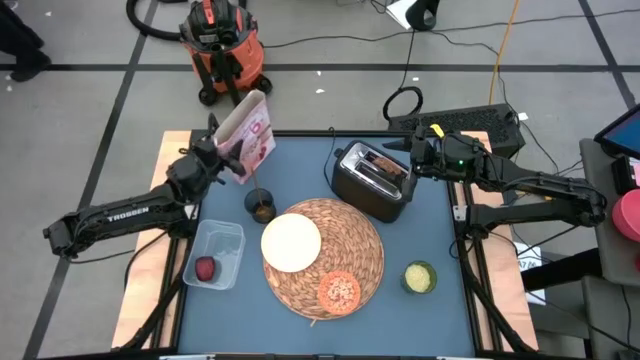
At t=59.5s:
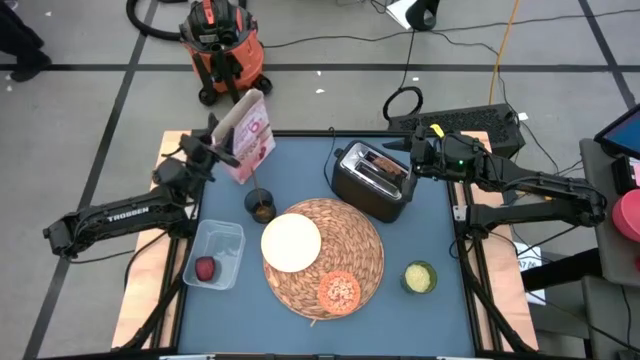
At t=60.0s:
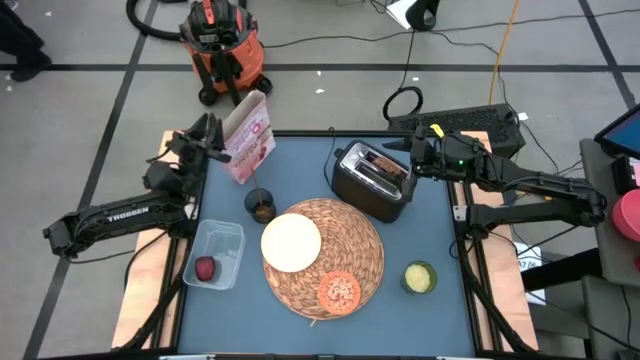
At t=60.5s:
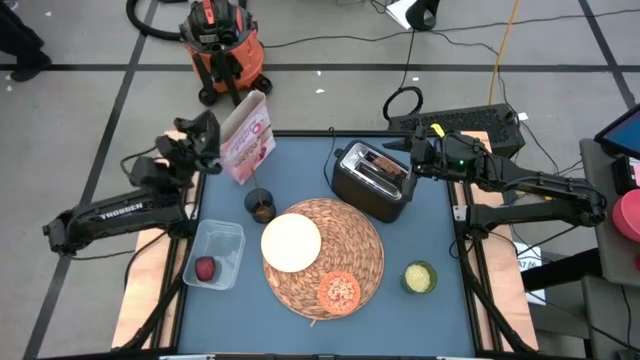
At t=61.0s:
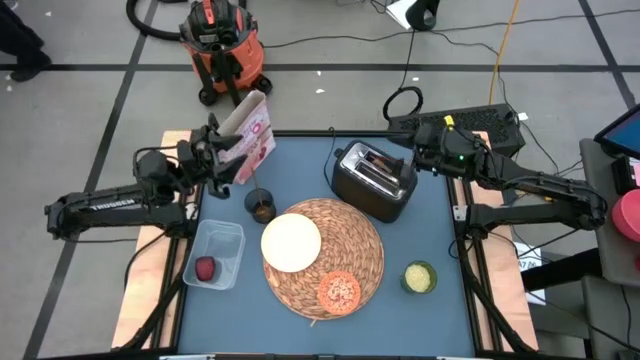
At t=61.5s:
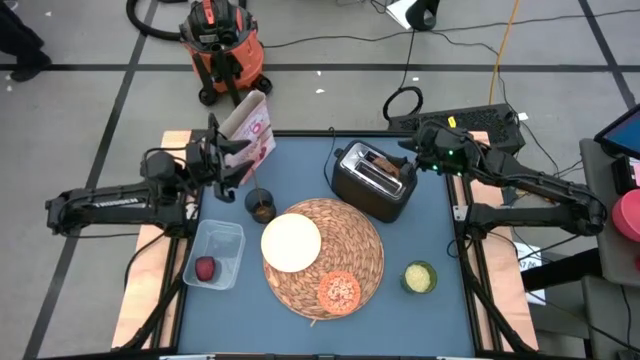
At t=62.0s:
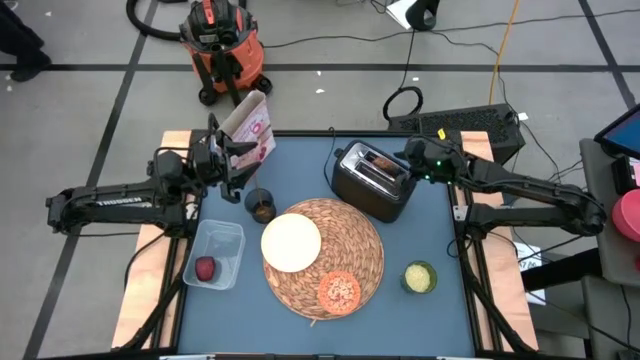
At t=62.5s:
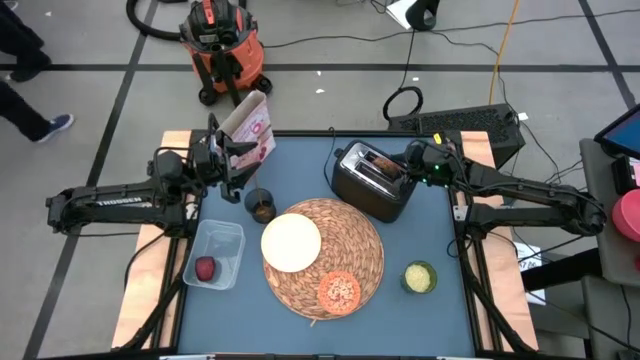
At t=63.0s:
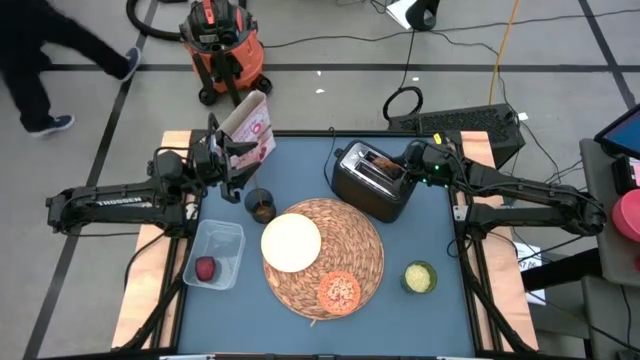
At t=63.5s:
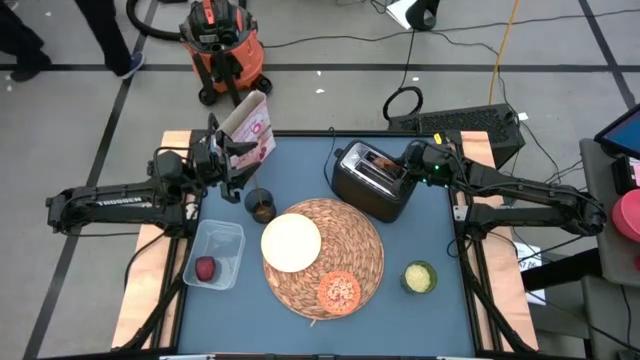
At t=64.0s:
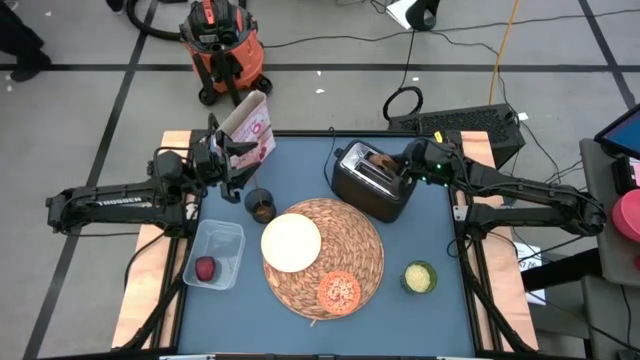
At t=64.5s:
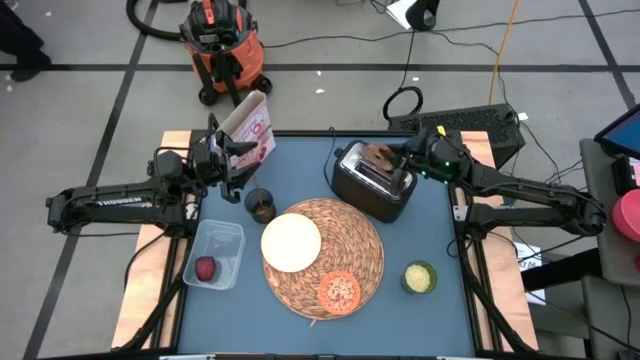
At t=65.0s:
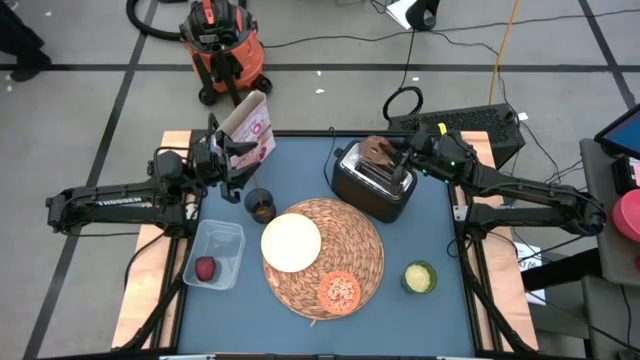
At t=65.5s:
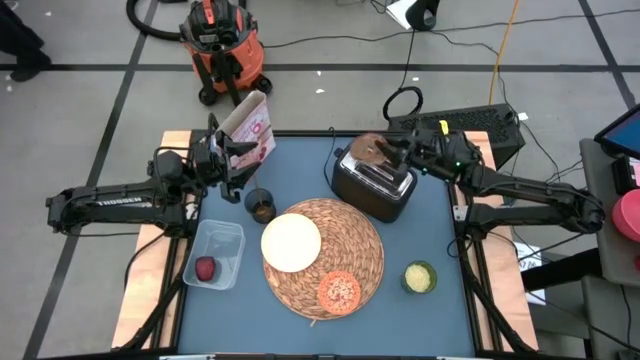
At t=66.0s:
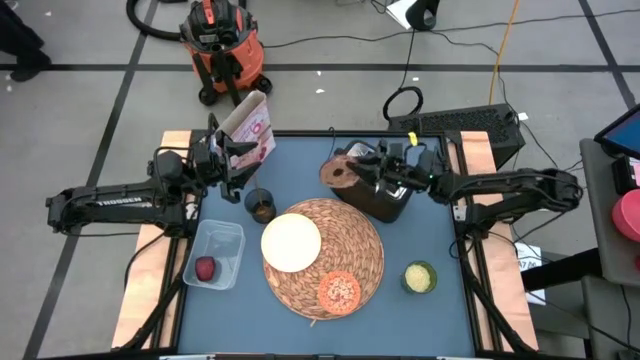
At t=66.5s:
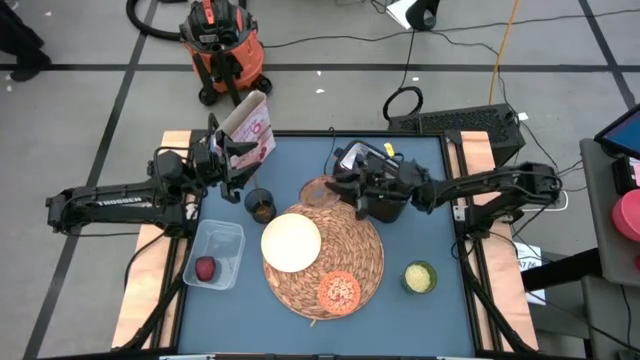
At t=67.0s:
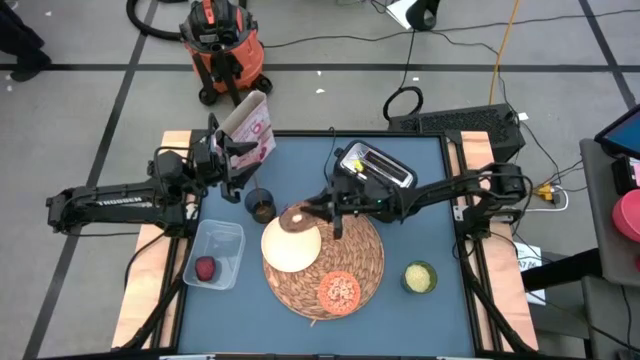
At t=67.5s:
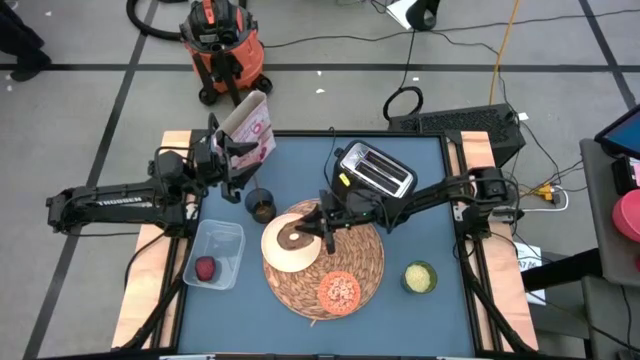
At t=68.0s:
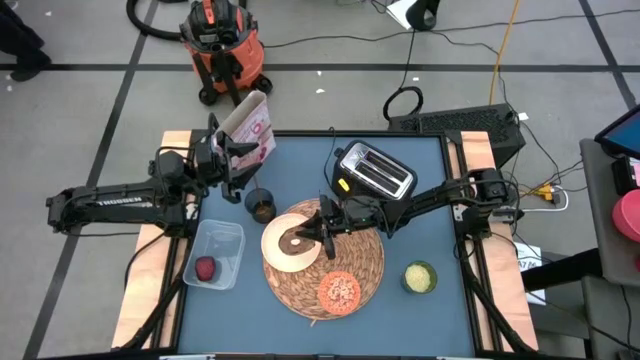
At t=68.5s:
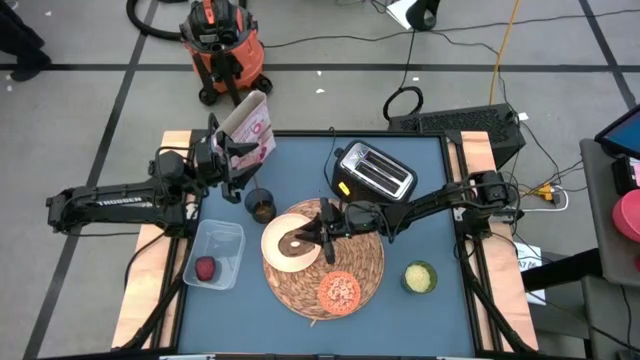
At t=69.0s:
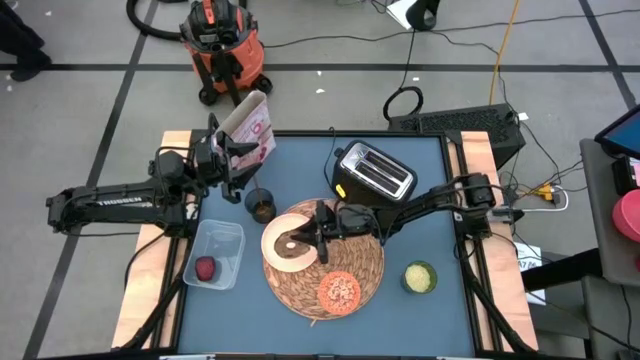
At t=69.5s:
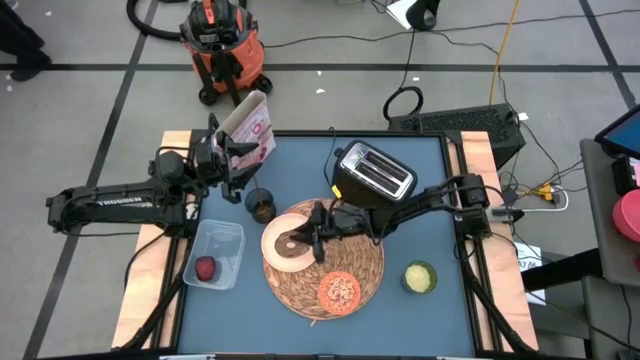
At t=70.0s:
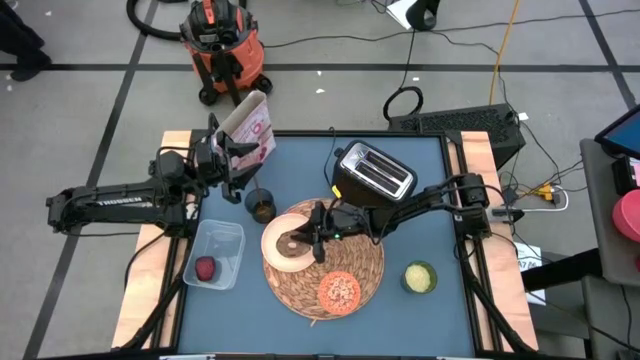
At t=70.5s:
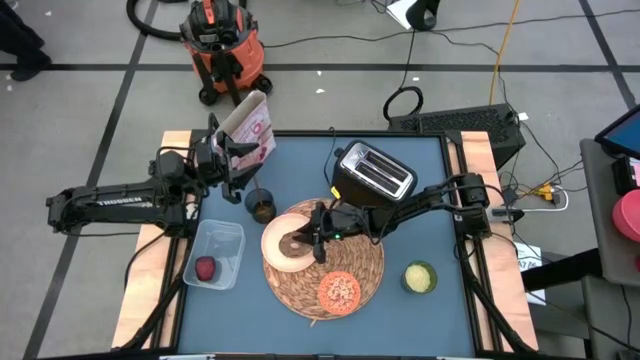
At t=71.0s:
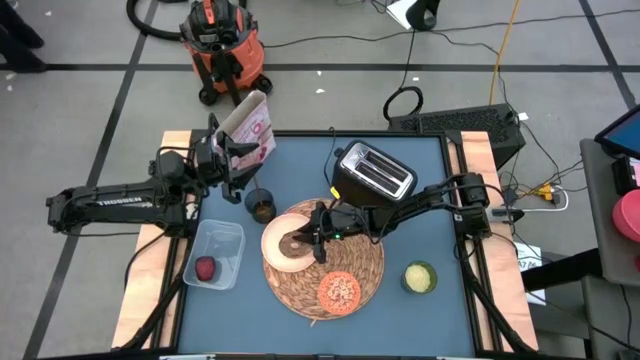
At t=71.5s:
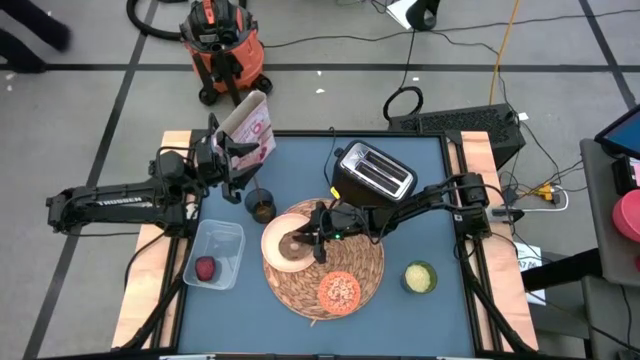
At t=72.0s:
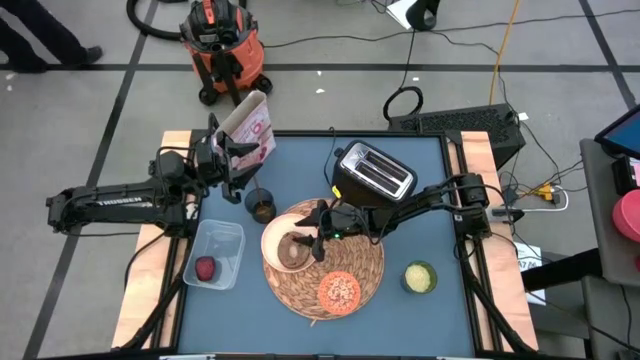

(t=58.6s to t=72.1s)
Task: Arrange a breakfast setting
Put the toasted bagel on the white plate
